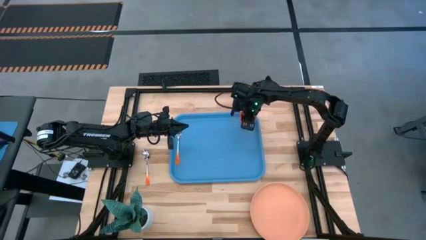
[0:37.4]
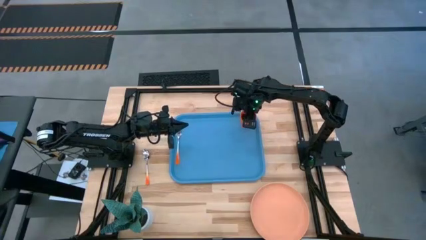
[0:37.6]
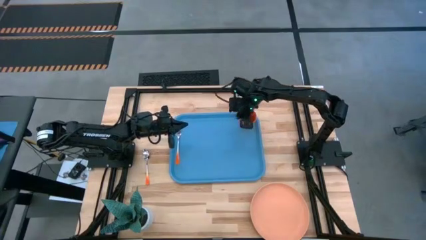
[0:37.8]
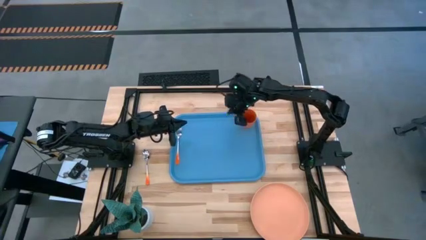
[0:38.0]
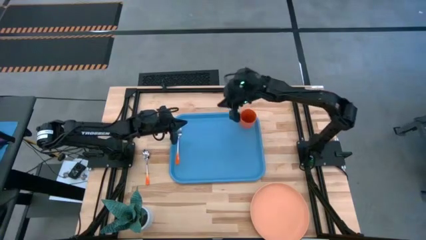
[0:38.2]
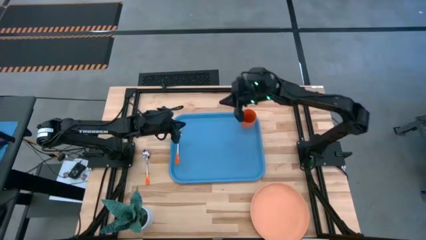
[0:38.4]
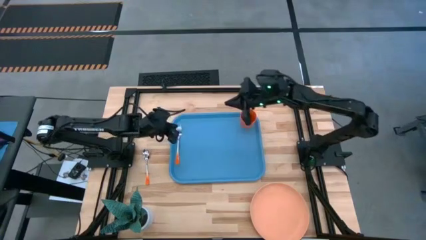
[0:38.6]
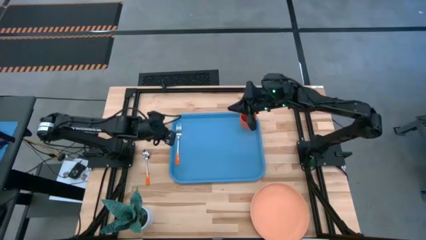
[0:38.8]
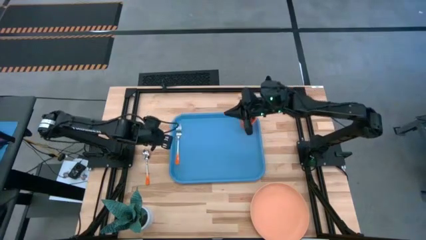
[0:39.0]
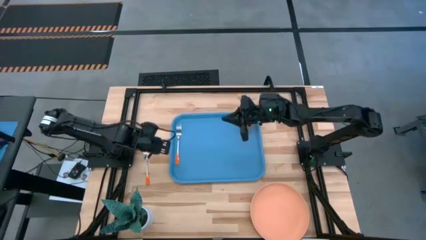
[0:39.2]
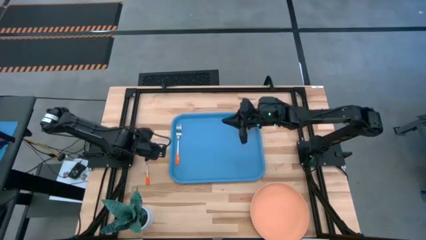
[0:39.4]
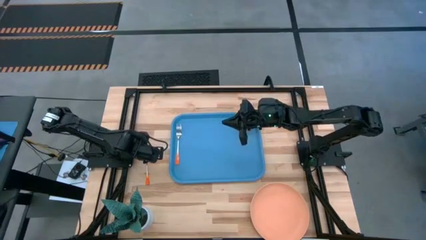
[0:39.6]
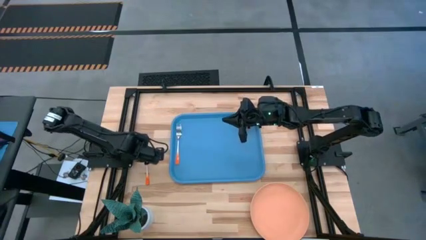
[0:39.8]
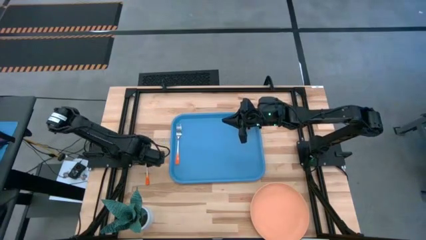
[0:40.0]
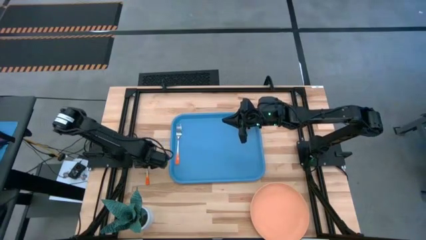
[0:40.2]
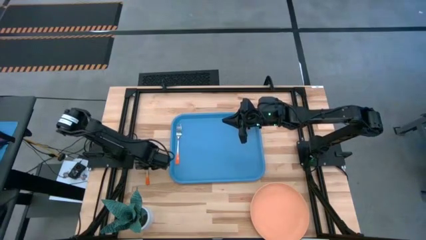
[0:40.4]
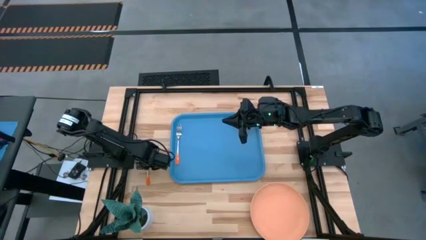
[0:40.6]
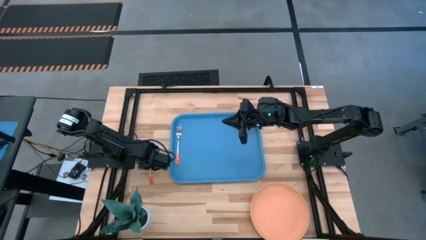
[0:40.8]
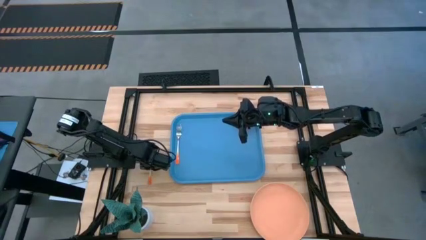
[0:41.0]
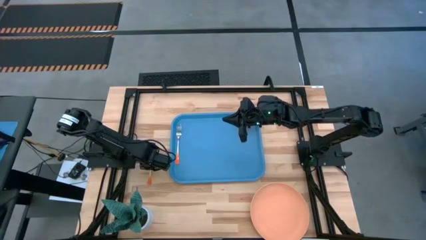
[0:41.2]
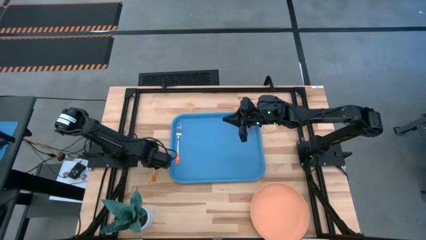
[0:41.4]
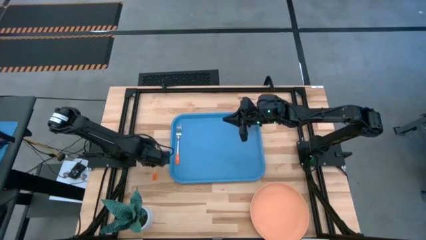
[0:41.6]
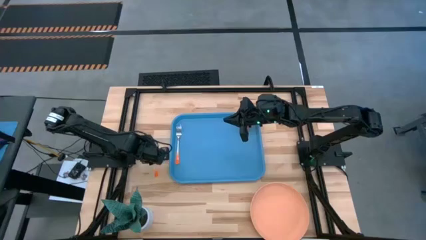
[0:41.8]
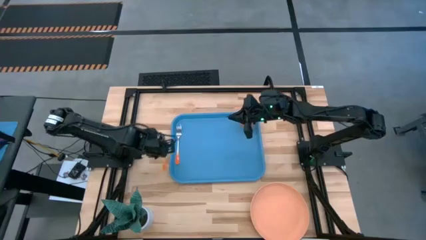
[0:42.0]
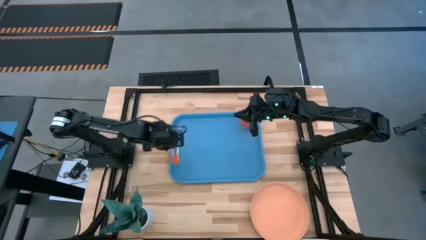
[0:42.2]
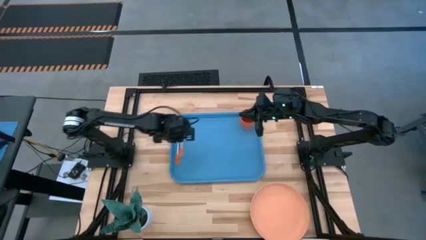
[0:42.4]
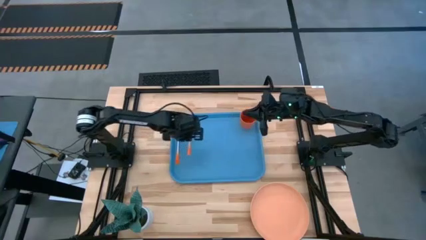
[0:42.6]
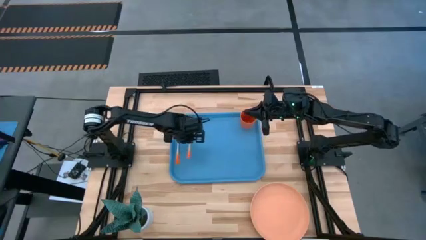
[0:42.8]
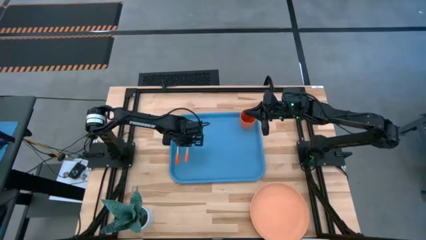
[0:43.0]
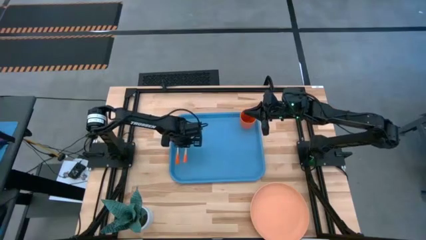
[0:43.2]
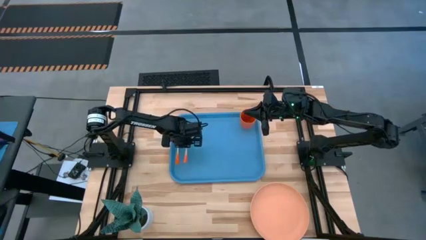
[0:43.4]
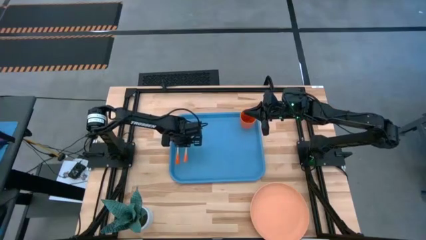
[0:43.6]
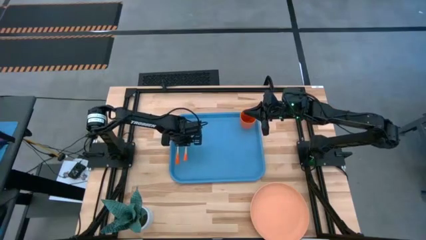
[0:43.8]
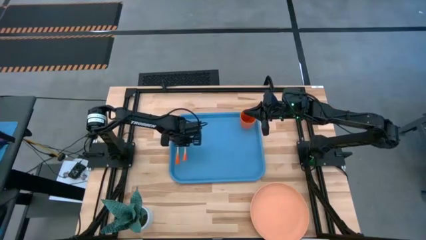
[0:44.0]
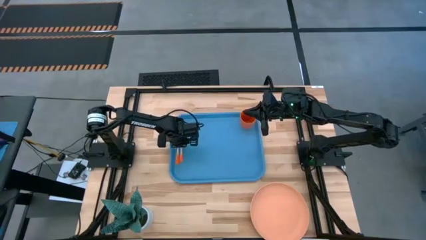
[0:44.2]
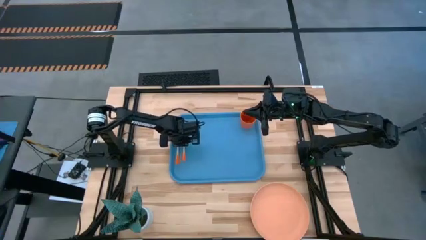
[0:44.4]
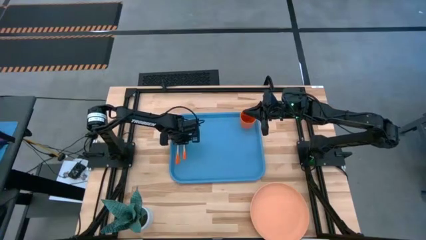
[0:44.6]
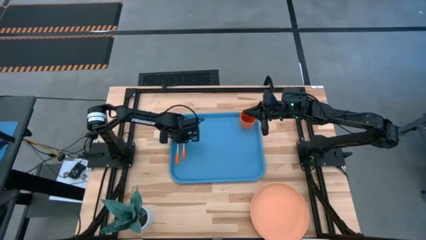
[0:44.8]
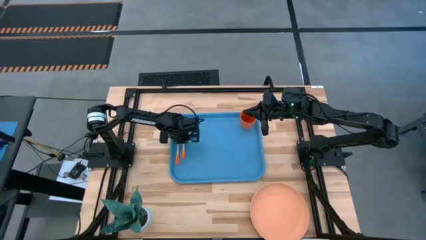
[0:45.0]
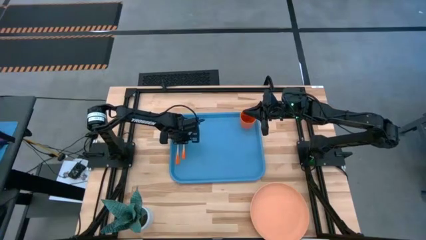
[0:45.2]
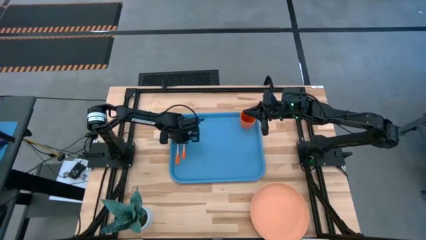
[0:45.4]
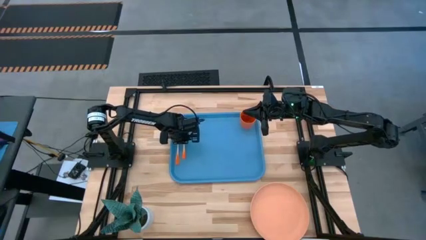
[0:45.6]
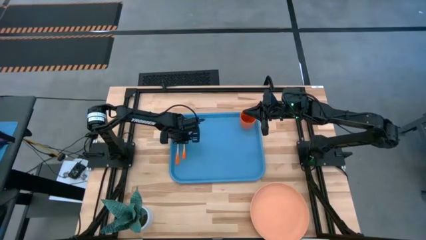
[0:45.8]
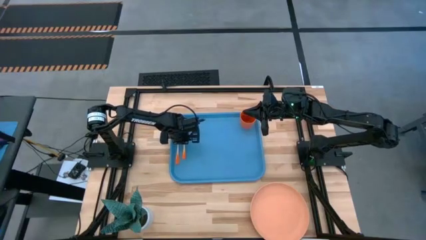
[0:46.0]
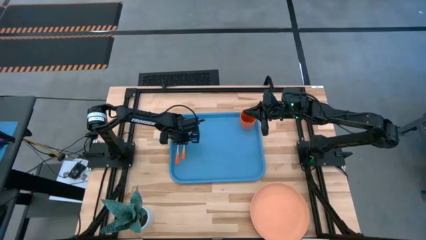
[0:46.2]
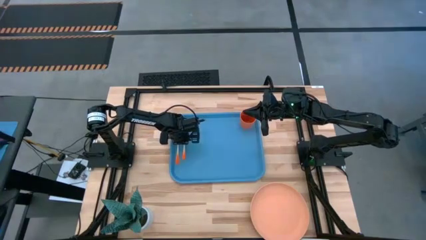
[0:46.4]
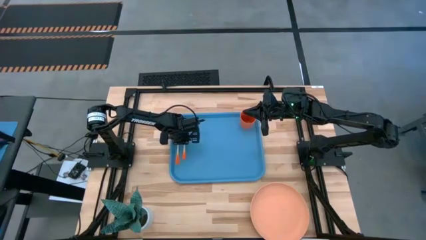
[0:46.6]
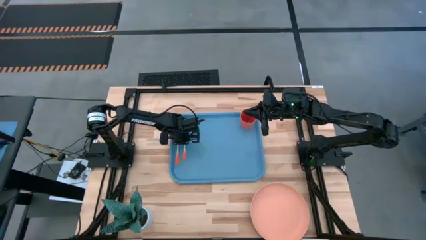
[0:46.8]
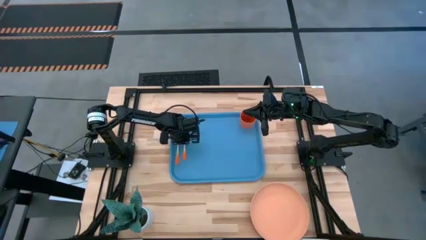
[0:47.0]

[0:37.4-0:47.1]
Task: Pick and place plate/cup/fork/spoon on tray
Put the orange spoon to the right of the orange fork on the blue serving tray

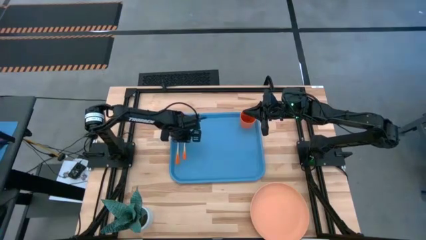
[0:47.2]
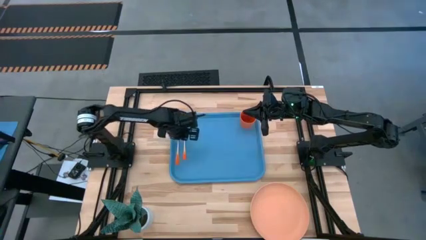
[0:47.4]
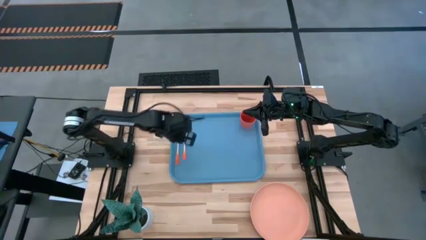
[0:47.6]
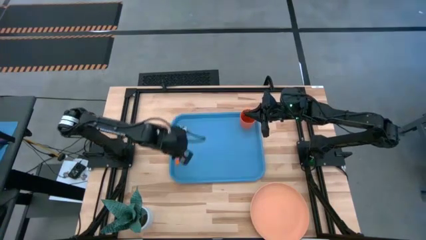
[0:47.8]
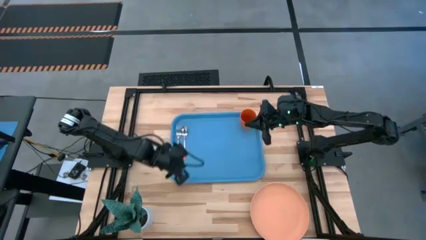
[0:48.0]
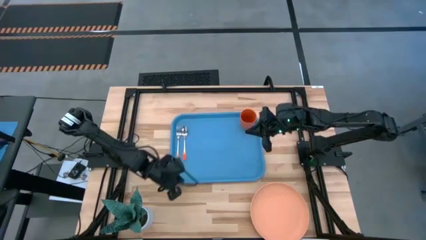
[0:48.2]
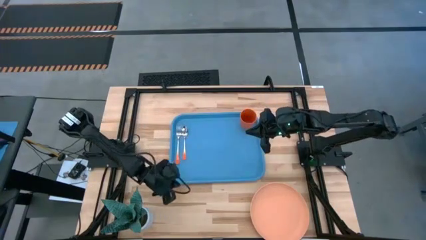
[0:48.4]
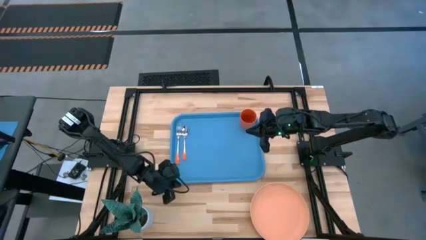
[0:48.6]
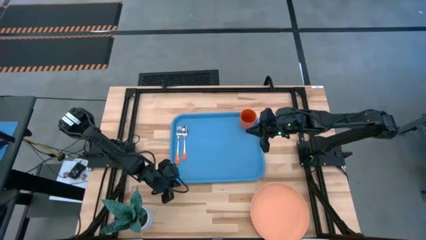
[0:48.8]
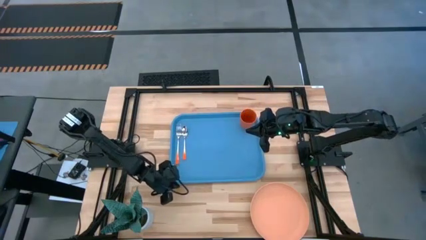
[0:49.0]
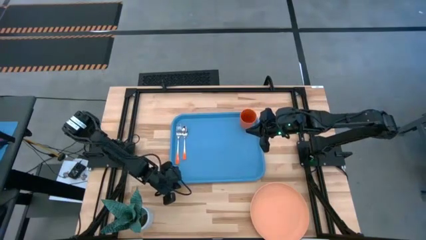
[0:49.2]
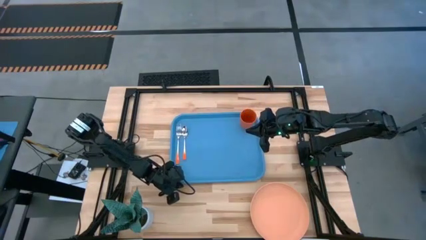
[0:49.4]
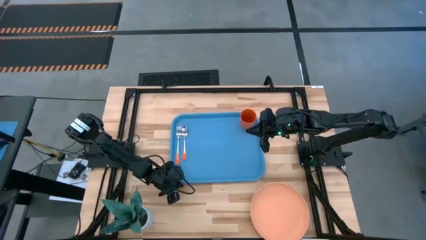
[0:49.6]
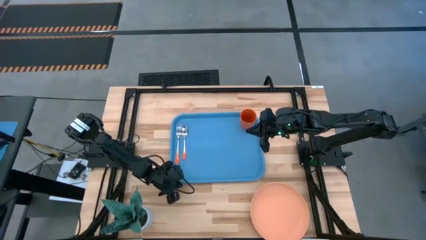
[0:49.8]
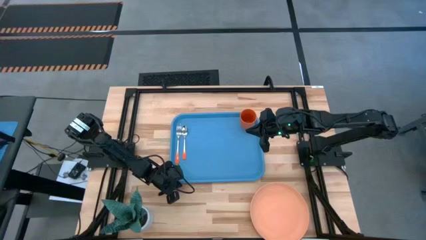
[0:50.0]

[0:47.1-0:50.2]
Adjust the blue serving tray

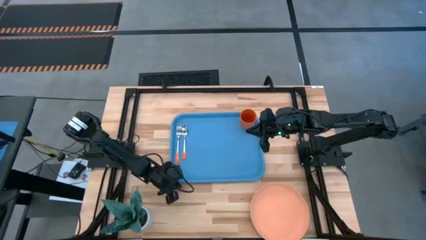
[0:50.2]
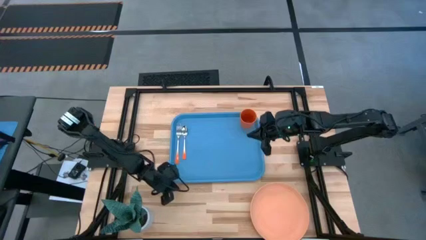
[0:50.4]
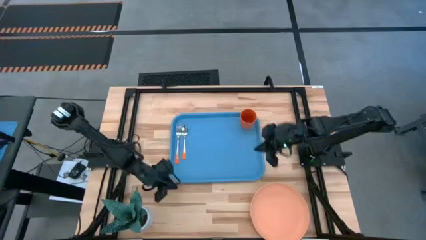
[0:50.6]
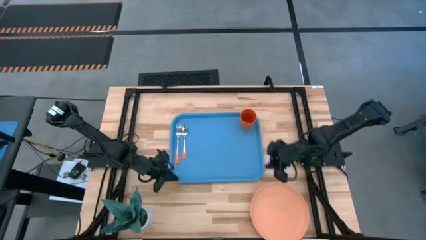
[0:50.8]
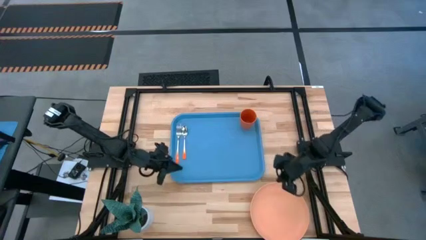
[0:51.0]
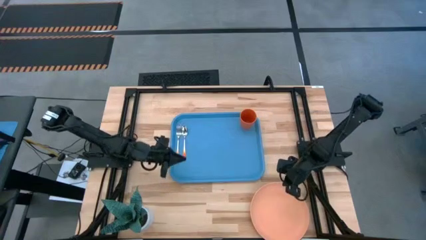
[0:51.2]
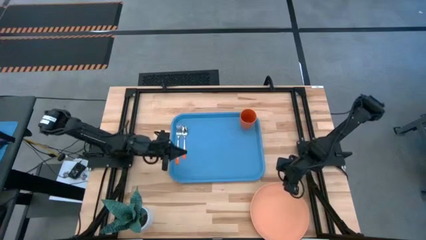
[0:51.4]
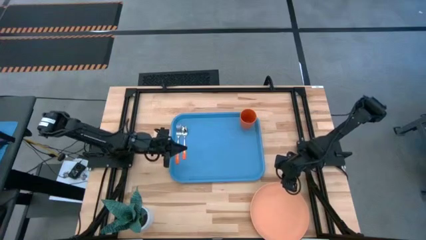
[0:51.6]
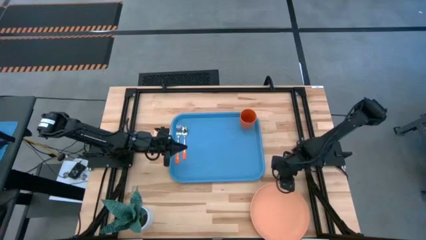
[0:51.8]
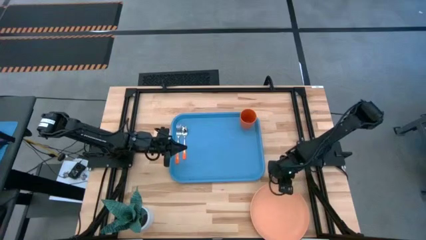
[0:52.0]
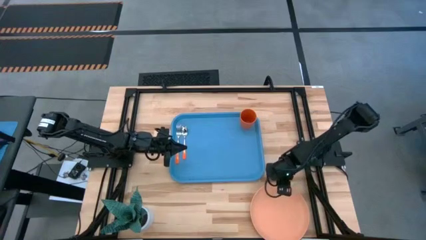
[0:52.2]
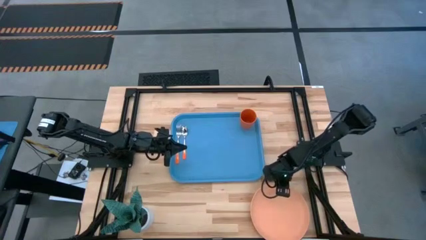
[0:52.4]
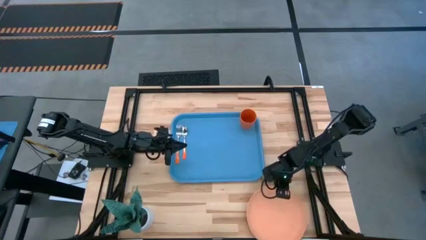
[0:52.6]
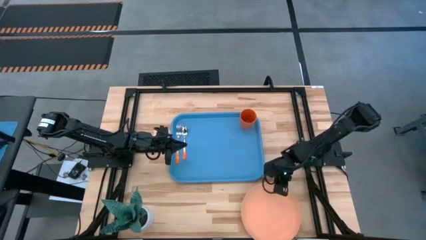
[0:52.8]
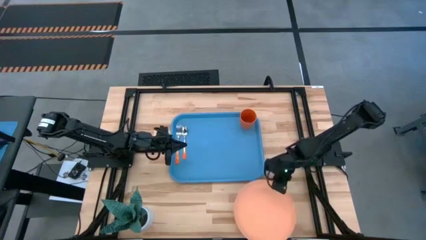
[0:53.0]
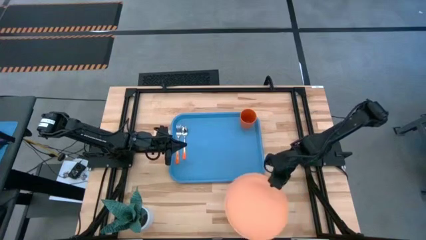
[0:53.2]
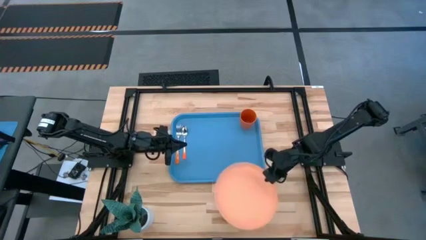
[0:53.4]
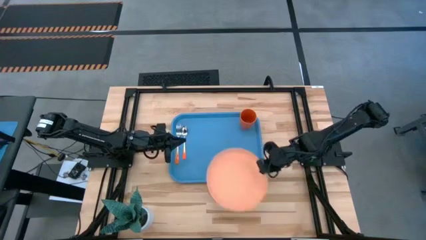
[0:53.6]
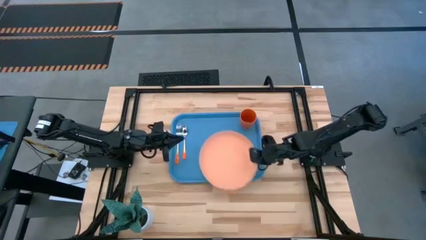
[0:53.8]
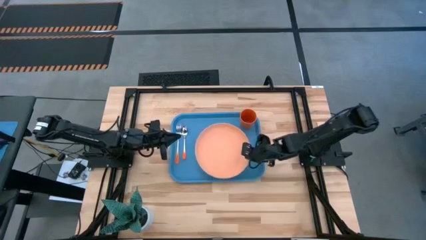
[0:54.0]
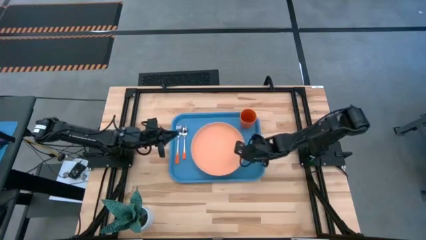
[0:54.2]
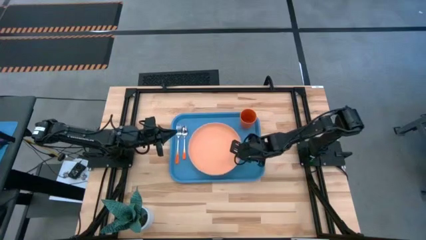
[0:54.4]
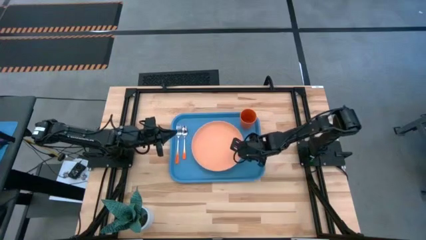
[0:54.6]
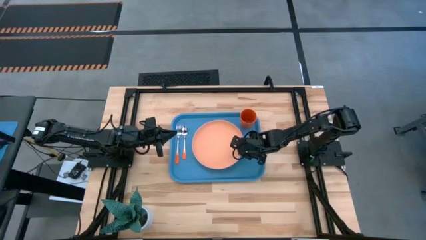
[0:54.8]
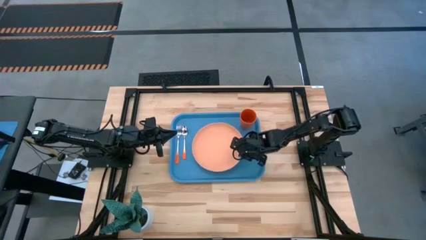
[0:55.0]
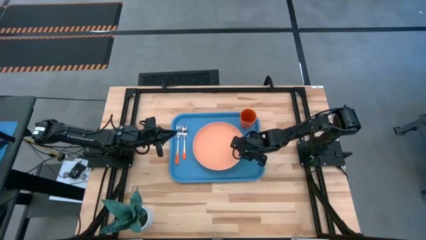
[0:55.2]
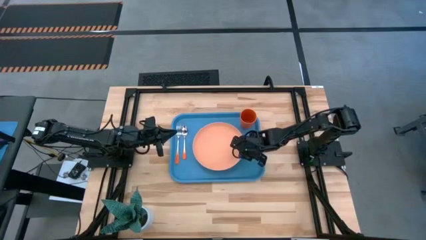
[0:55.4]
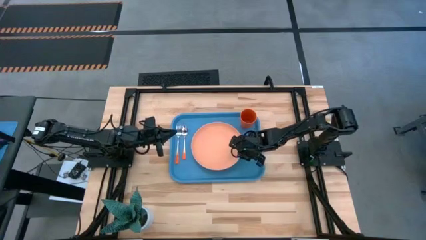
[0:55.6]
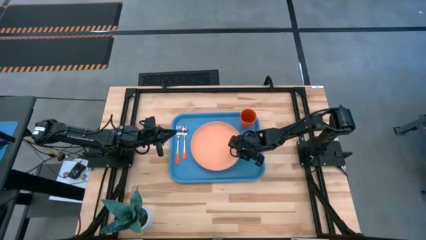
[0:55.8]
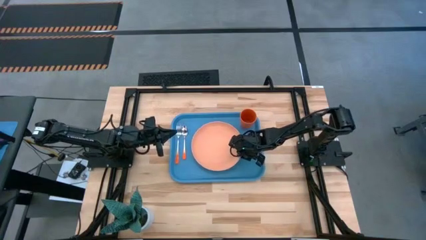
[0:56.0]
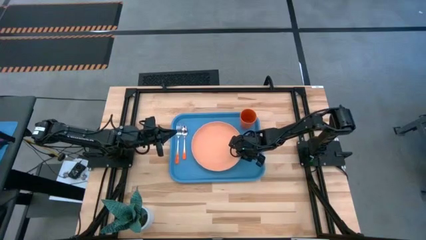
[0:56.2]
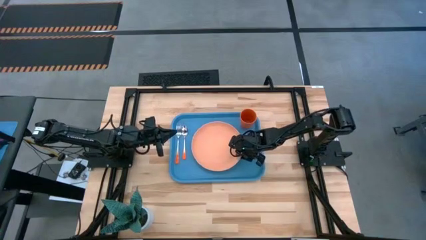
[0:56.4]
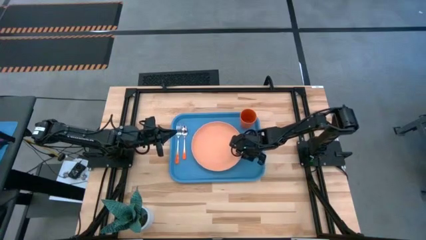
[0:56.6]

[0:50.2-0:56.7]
Put the light orange plate to the right of the orange spoon on the blue serving tray
